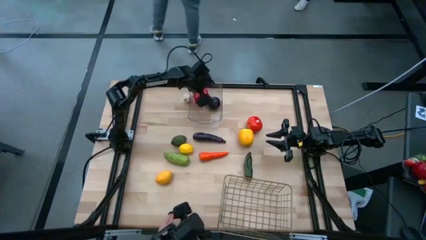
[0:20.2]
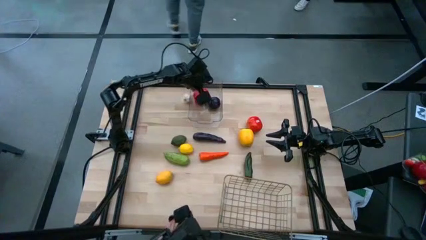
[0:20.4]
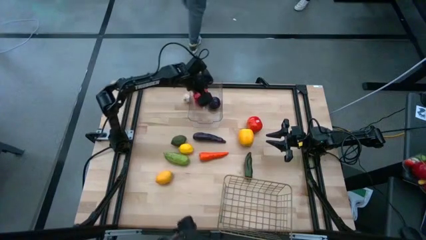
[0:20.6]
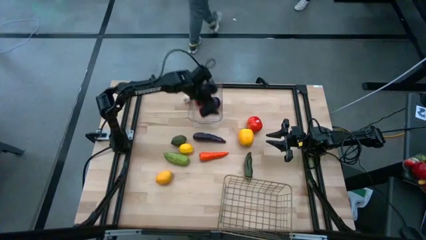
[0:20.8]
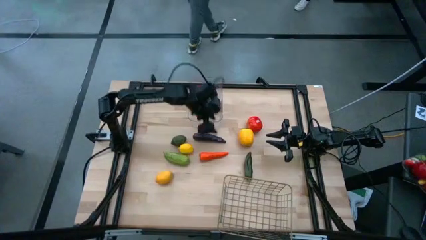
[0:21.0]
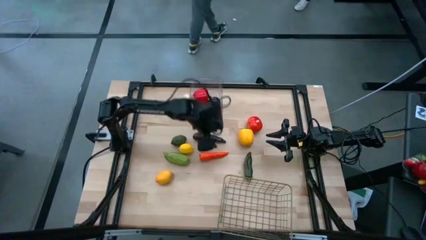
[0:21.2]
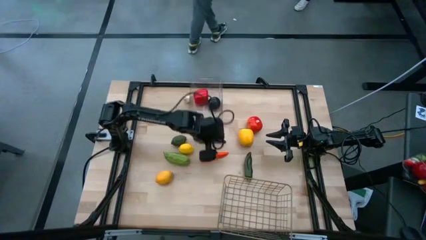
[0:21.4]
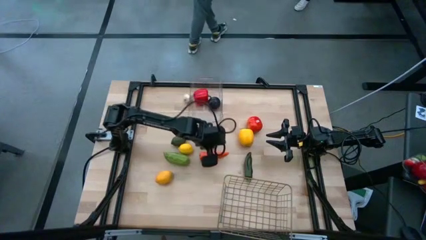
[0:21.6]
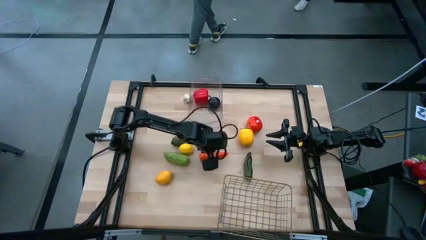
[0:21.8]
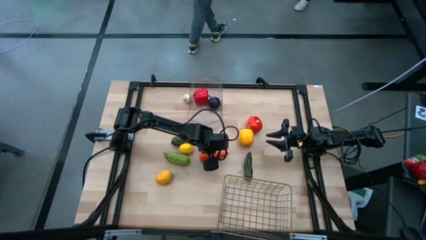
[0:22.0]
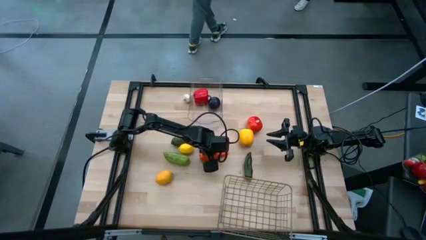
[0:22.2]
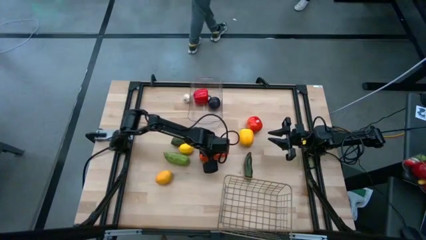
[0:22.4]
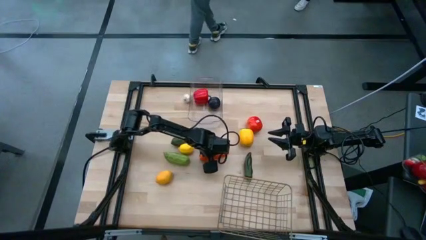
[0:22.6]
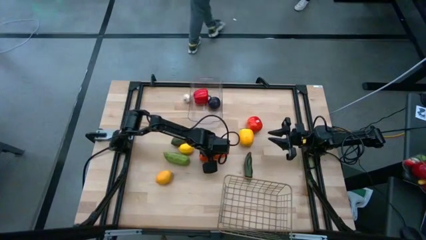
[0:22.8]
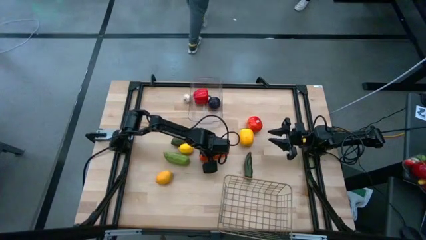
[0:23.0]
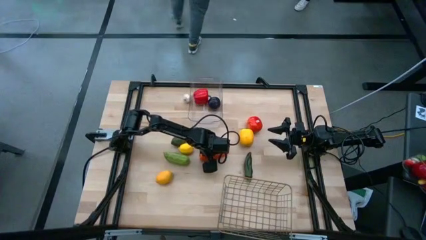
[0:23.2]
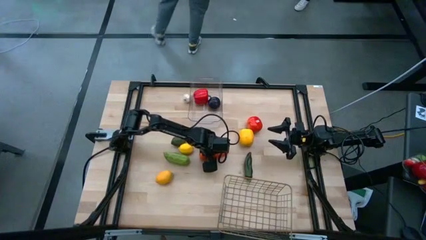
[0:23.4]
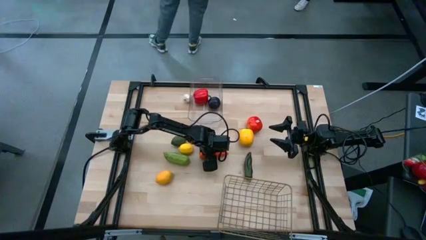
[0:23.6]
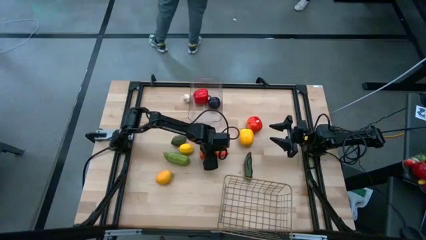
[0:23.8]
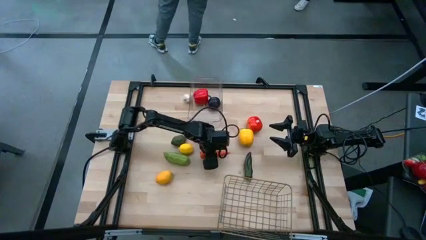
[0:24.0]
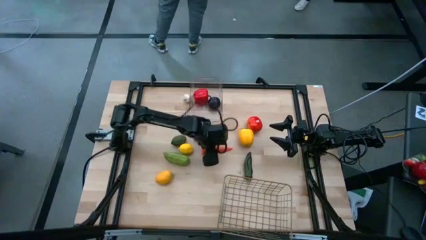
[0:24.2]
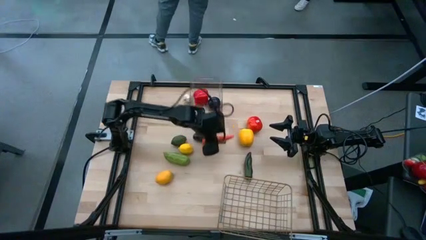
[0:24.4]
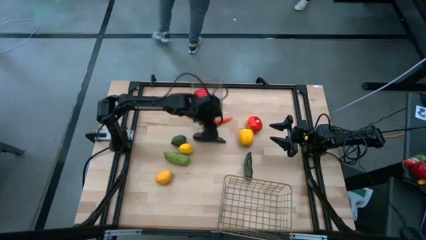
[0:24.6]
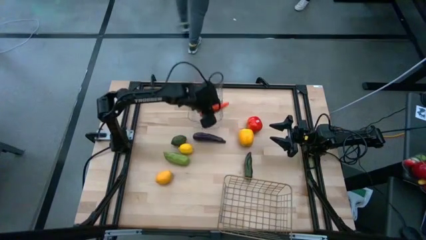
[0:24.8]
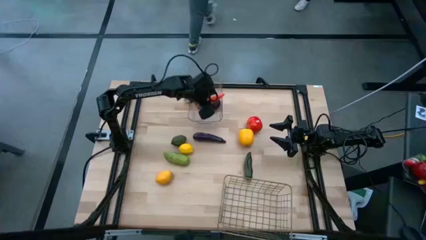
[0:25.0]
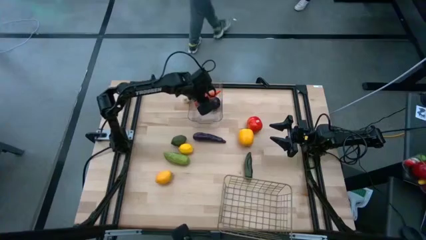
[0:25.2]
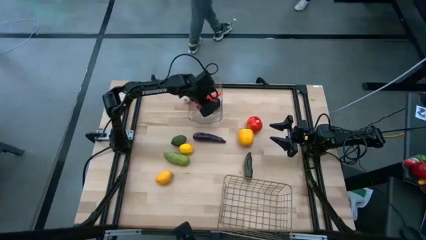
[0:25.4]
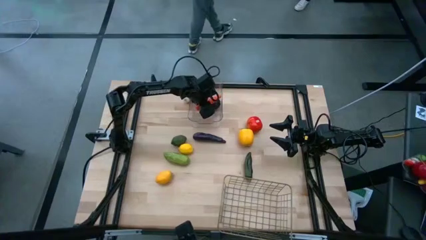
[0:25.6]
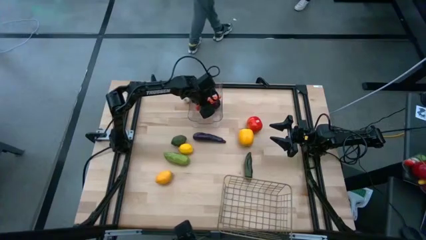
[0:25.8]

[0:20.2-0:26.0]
Task: Sort produce into baskets
Put the orange carrot into the transparent bin

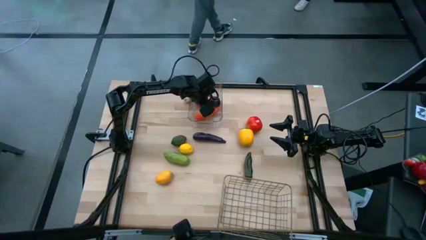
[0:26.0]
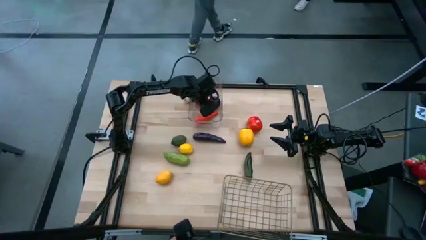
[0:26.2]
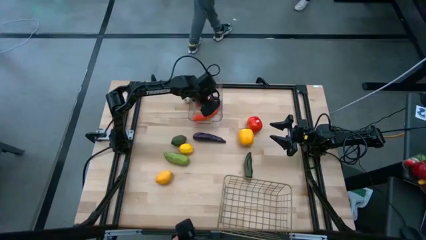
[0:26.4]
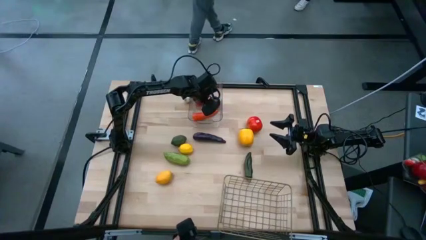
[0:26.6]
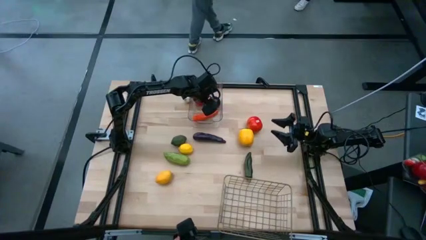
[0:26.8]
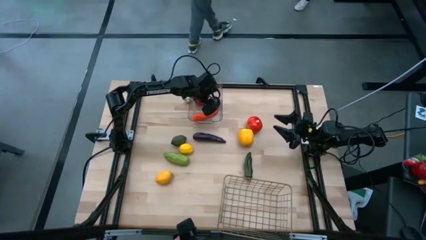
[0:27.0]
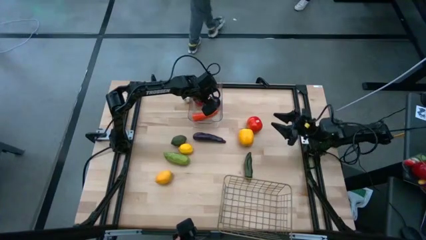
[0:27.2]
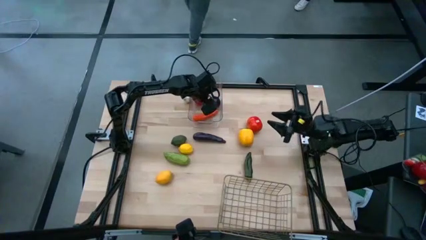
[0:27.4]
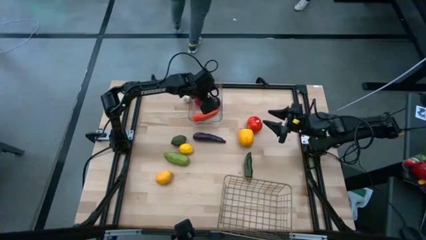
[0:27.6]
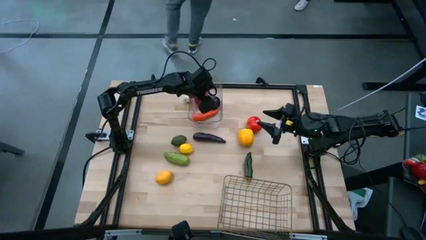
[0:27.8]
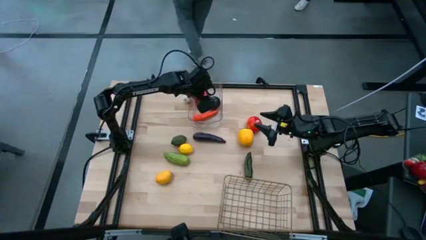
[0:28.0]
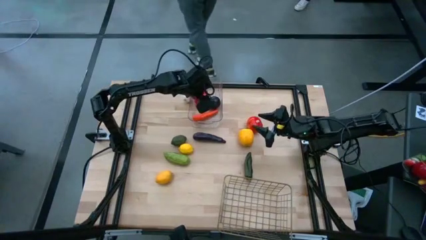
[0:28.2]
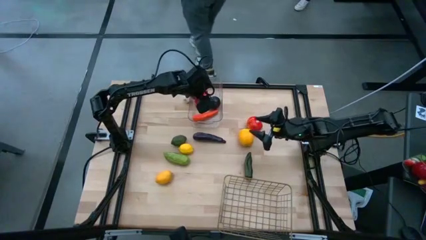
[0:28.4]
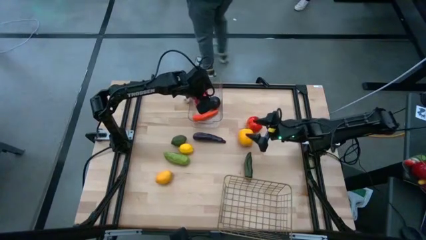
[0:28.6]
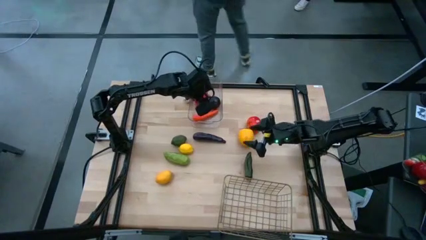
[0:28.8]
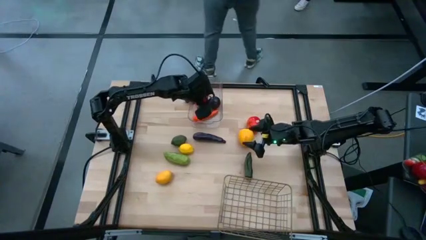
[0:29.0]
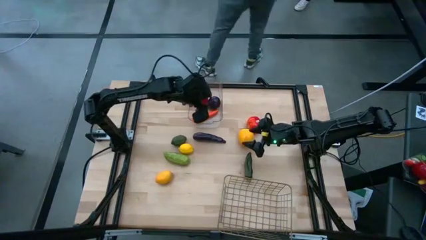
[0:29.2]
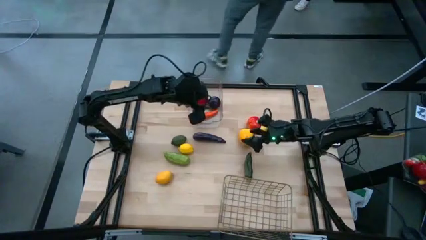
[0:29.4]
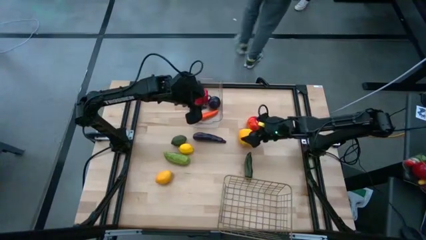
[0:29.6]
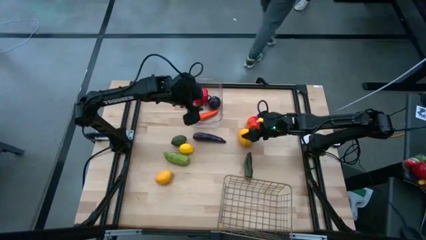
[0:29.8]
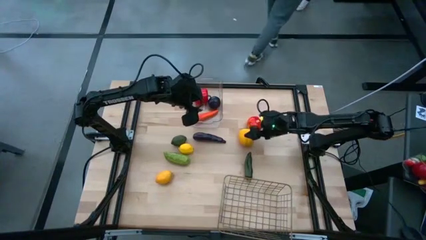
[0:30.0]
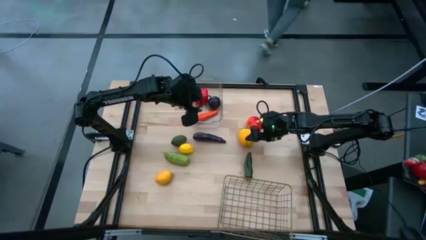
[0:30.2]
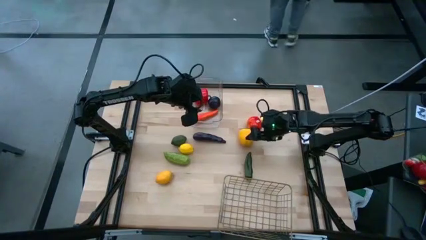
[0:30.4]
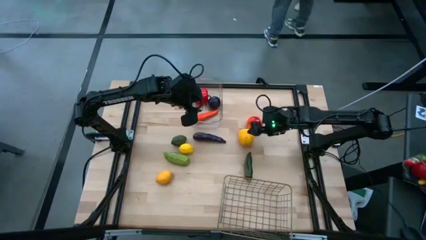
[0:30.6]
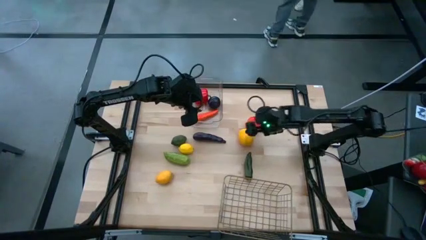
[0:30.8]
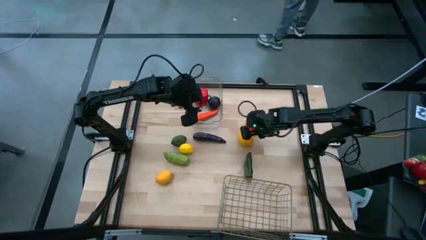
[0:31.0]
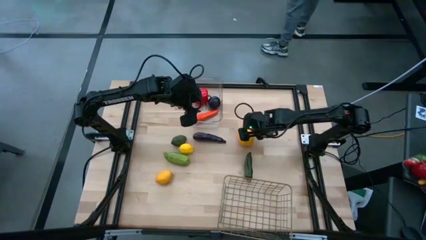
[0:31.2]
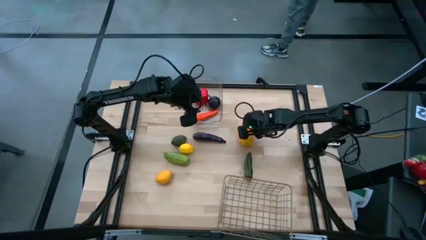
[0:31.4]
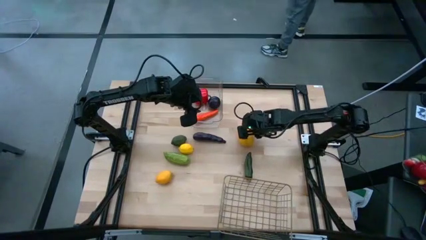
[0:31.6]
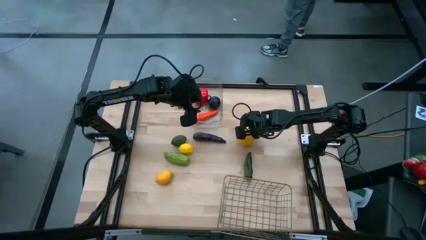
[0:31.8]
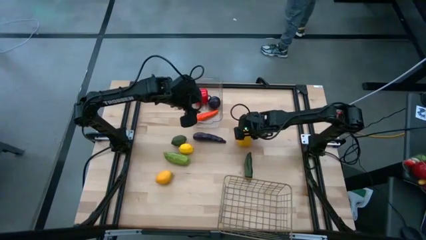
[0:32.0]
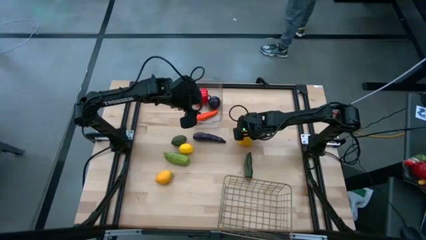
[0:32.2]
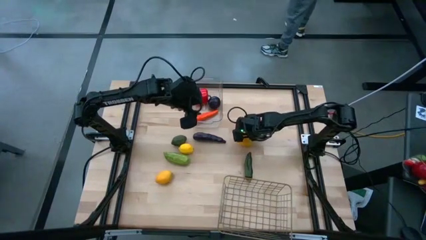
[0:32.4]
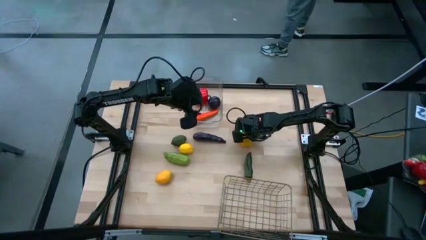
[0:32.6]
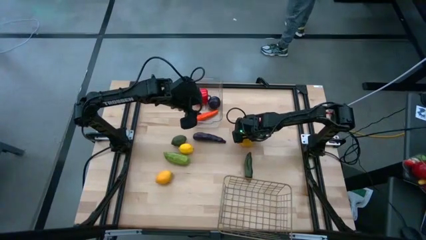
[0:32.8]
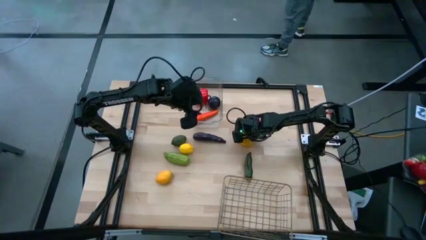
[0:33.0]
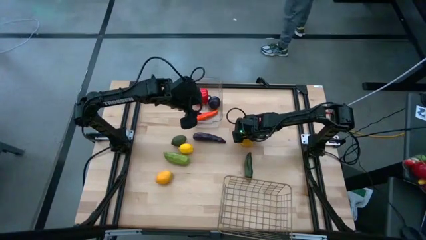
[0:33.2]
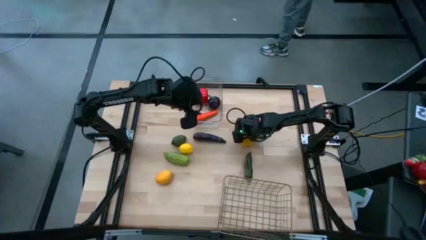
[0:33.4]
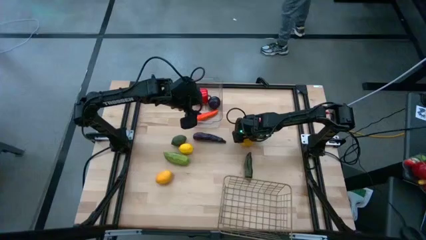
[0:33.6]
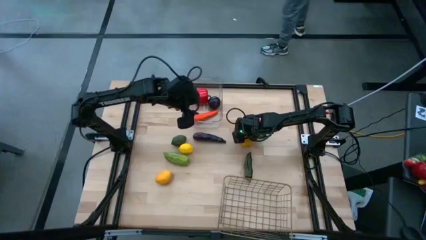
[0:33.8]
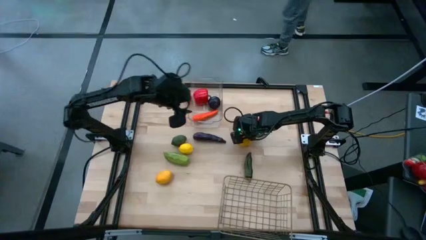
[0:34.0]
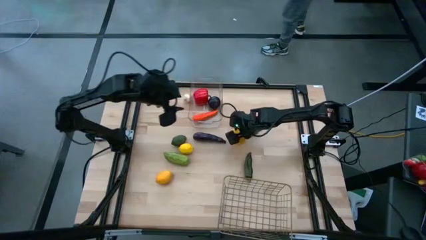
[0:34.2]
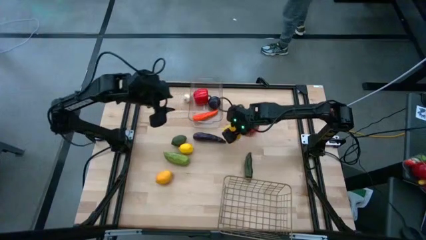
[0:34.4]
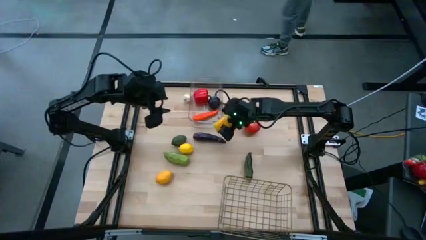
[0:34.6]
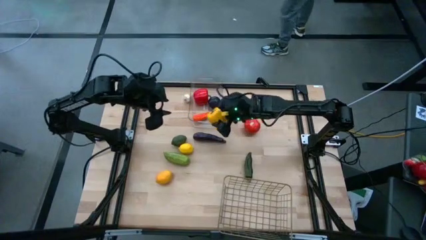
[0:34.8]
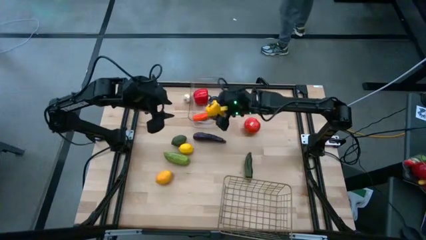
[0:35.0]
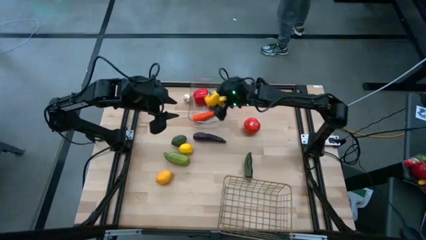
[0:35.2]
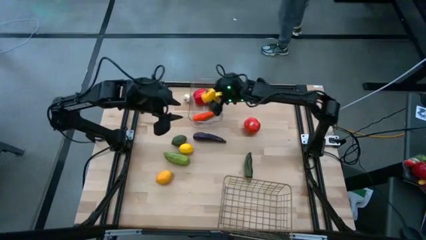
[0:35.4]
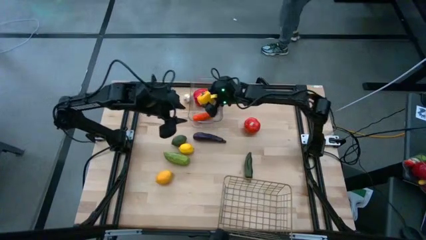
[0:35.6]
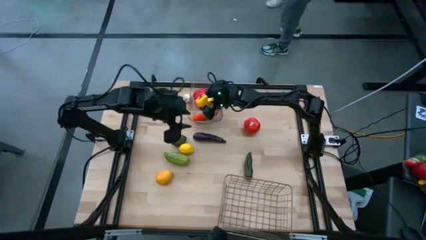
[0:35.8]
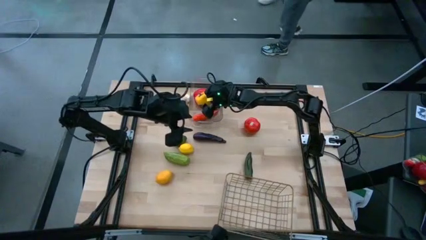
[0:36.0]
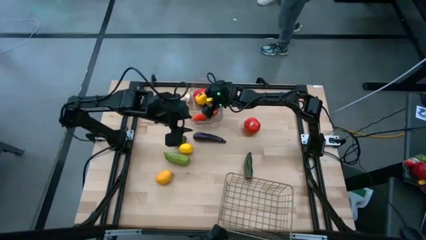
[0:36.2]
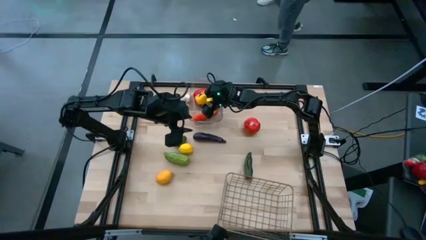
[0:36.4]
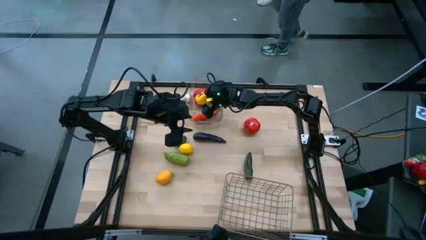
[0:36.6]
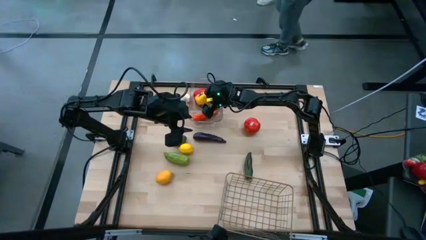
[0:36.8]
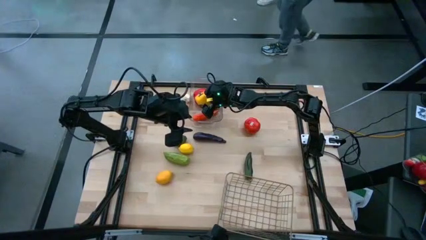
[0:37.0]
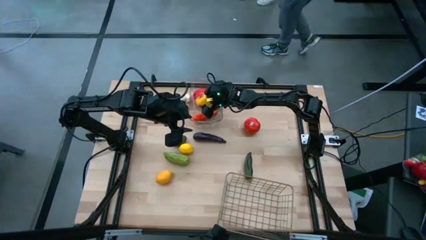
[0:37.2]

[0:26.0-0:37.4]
Put the yellow bell pepper into the transparent bin
